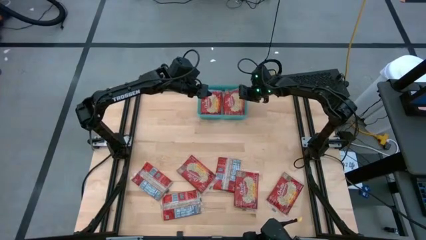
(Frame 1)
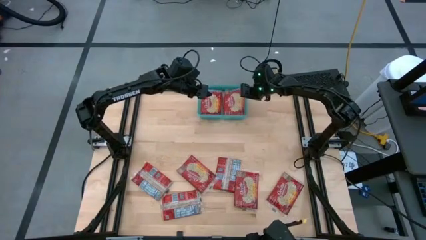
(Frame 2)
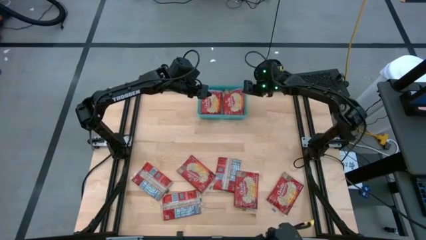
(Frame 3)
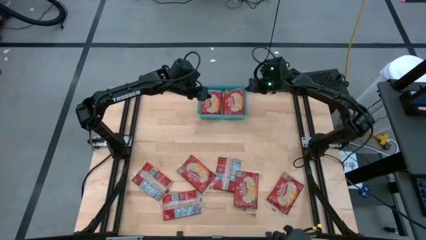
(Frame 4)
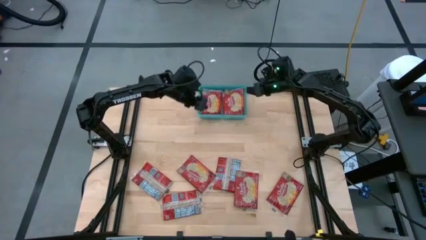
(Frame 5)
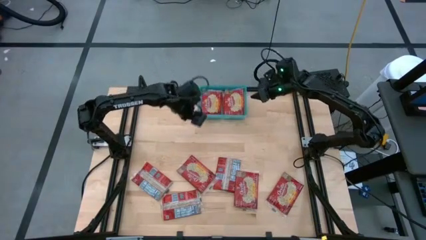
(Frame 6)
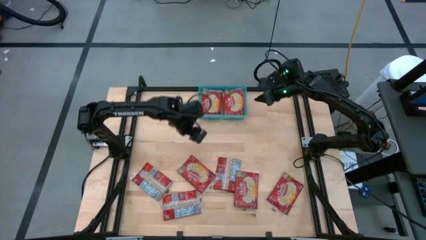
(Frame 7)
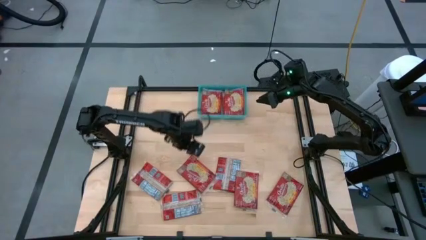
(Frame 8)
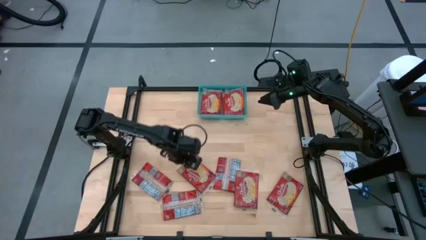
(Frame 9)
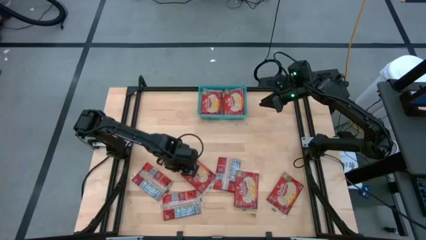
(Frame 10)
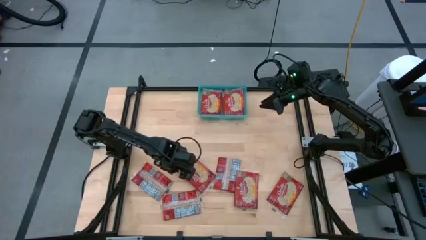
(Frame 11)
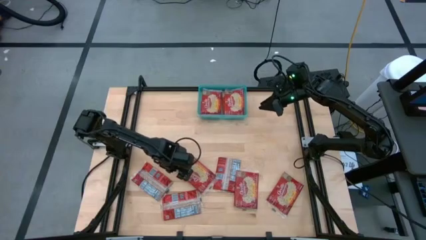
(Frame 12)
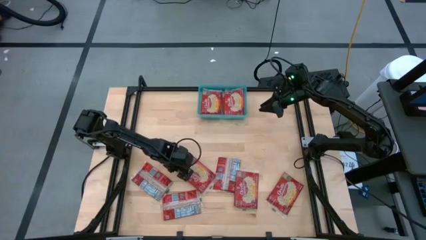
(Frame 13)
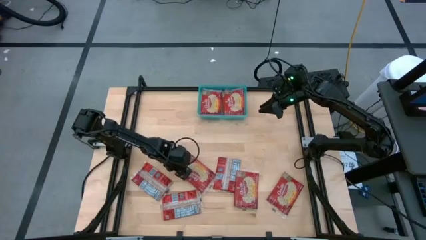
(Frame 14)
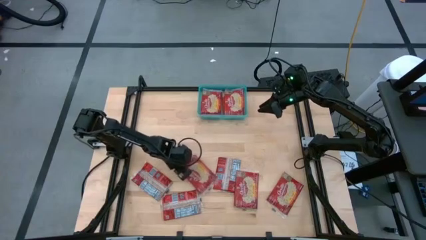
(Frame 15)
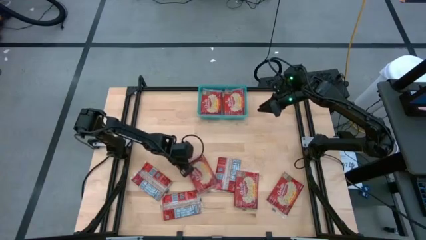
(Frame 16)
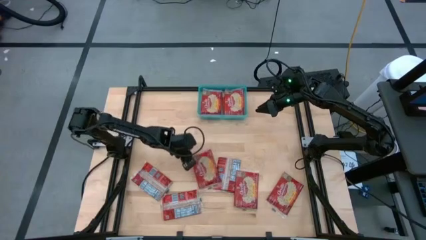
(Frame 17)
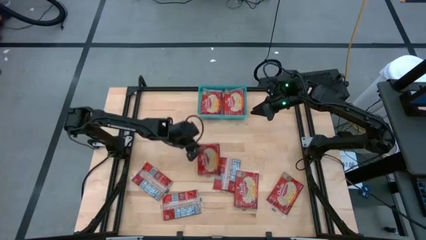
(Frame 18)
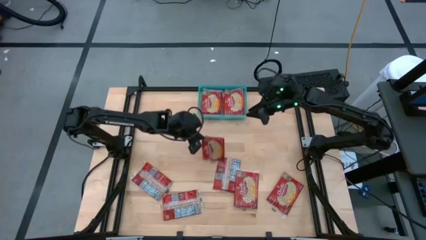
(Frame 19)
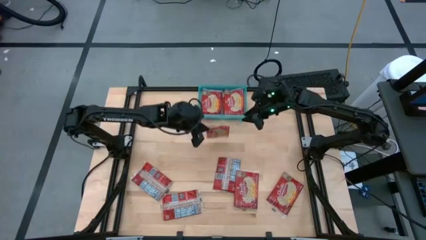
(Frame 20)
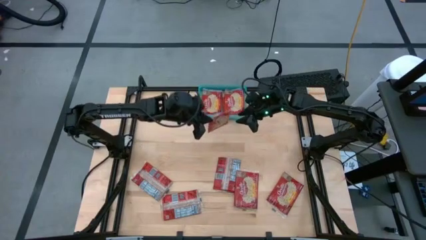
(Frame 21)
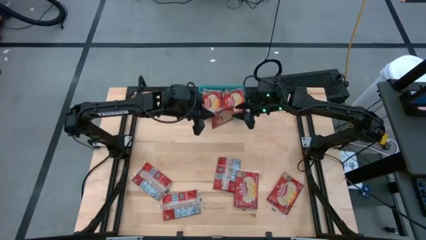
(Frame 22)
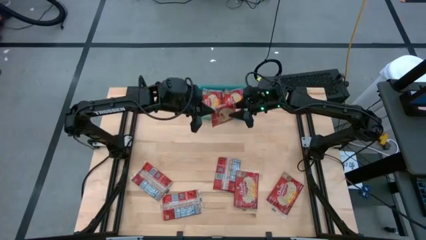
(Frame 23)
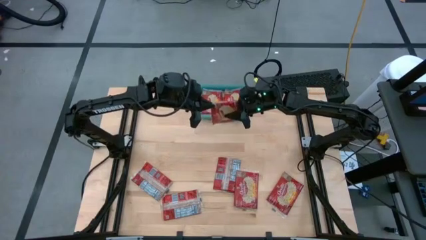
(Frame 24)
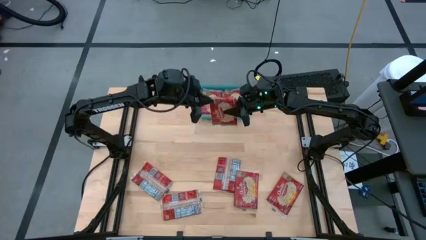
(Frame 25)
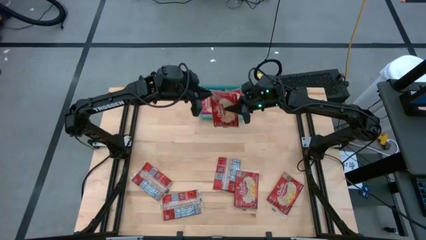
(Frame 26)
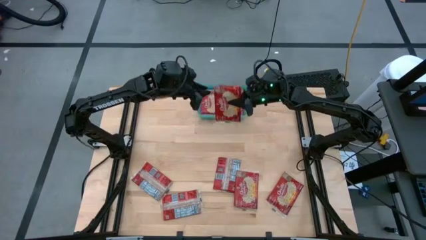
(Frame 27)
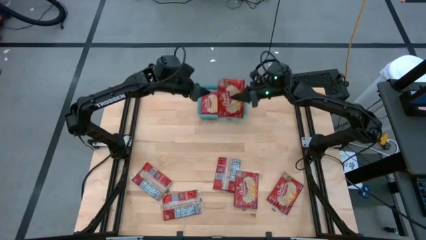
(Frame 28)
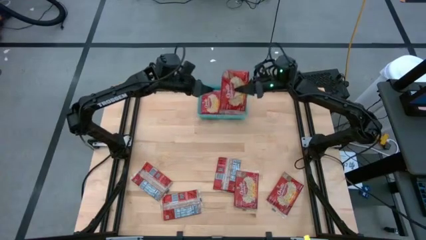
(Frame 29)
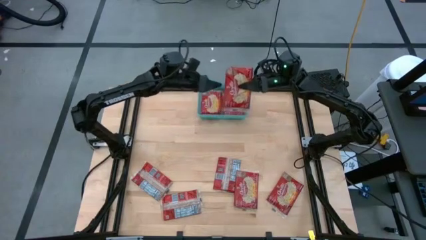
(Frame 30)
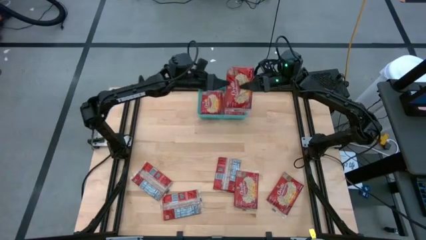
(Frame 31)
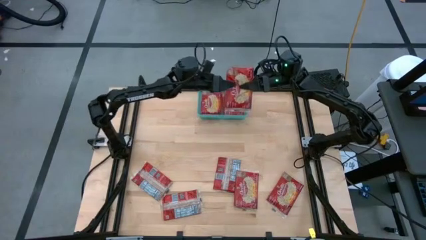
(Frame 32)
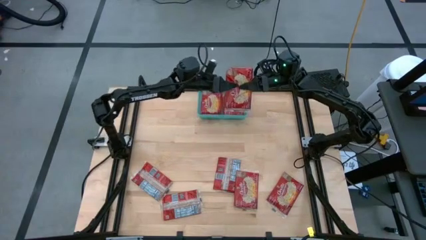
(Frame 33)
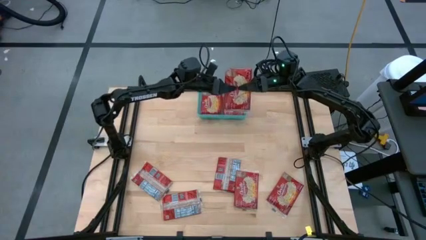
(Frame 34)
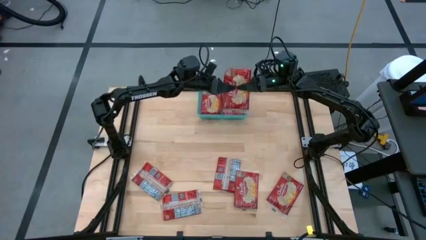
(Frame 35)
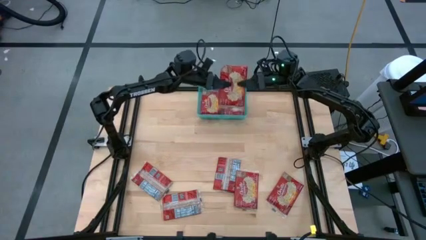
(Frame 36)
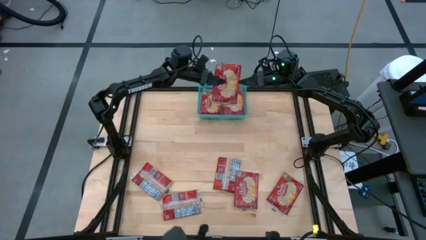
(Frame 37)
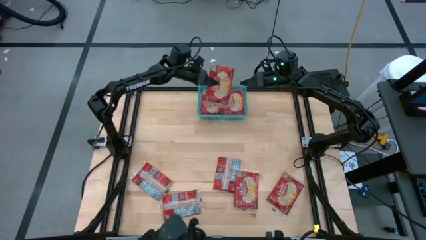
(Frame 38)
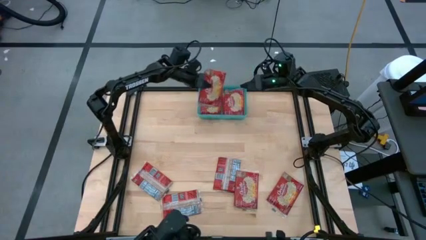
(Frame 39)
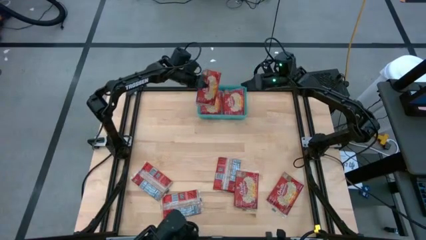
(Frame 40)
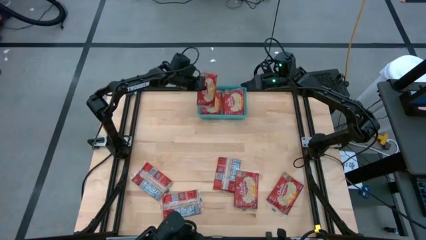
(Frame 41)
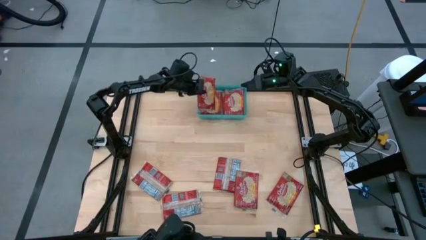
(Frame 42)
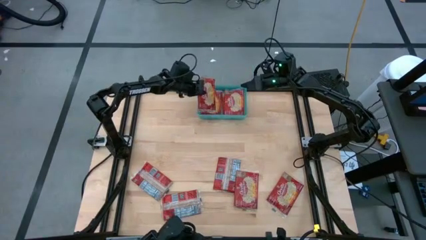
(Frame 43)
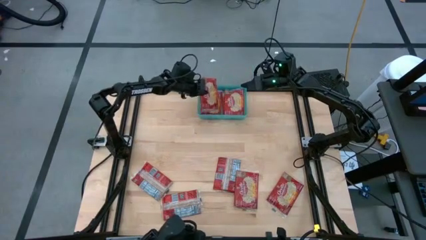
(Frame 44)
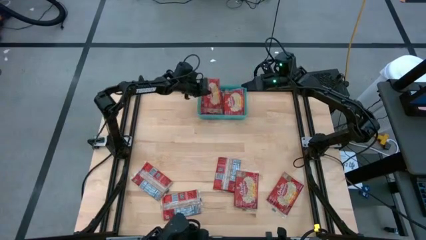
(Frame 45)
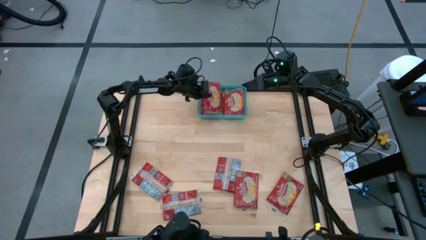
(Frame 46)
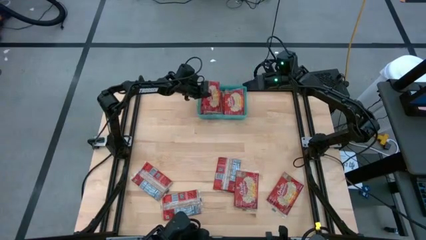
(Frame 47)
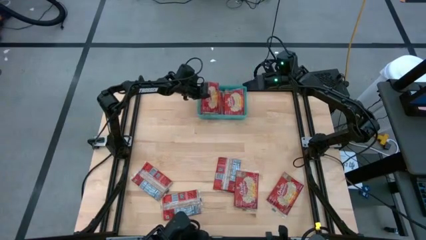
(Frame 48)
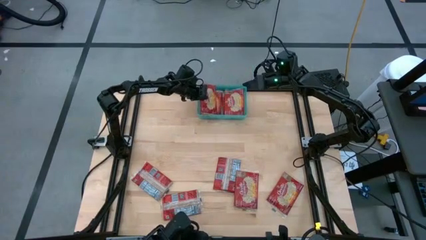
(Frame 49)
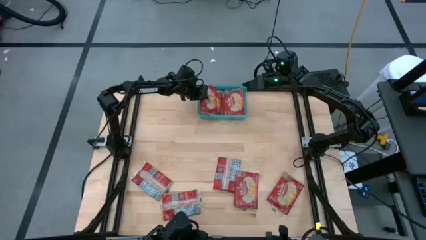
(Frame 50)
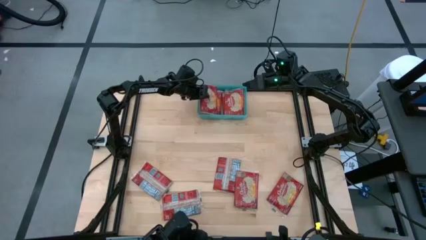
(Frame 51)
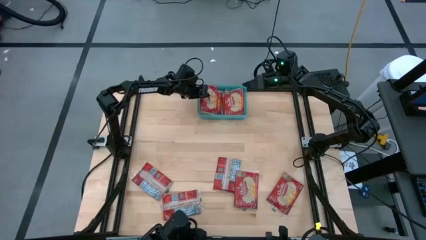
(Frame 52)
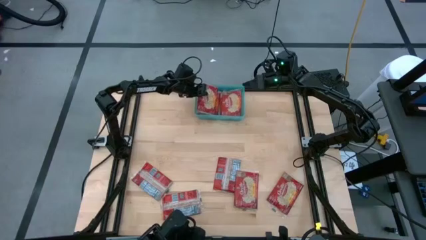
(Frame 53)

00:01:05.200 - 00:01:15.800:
Task: Sort popcorn bags into baskets
Put the red popcorn bag into the blue bin
